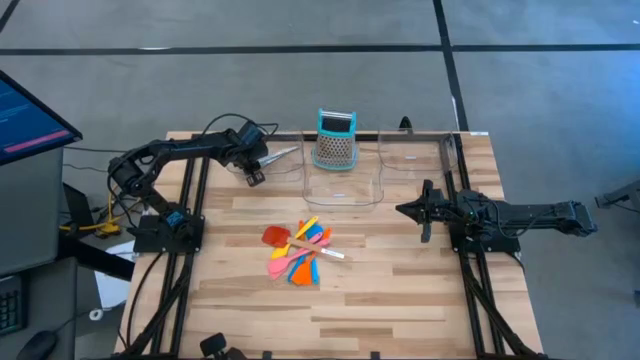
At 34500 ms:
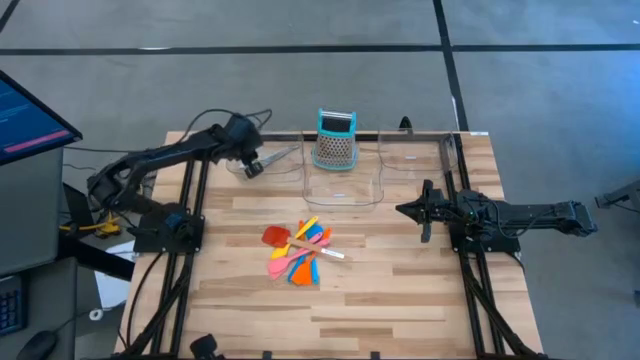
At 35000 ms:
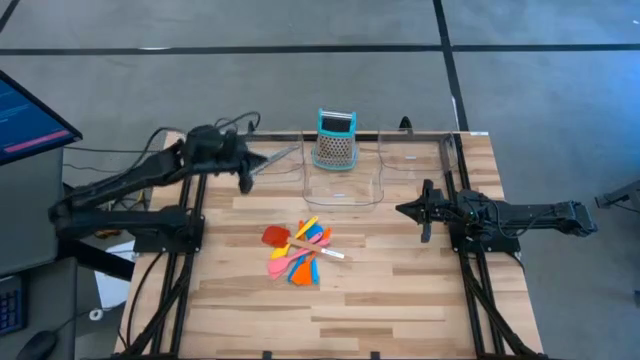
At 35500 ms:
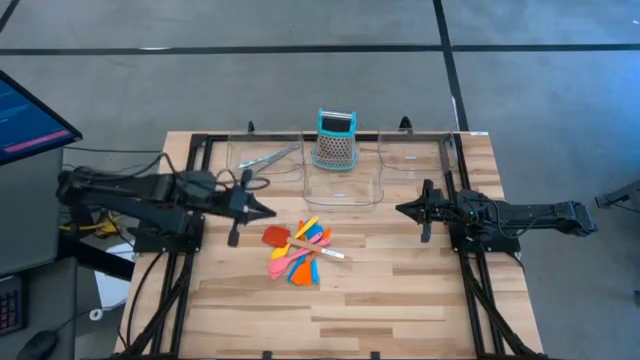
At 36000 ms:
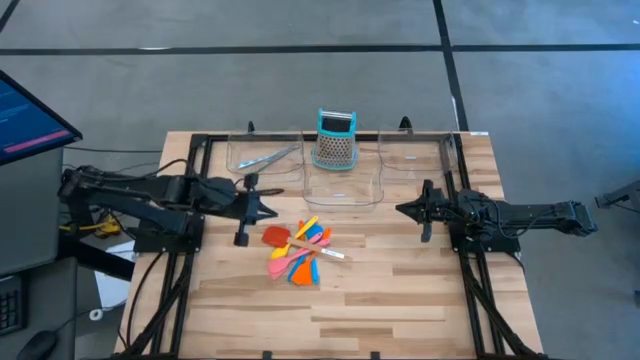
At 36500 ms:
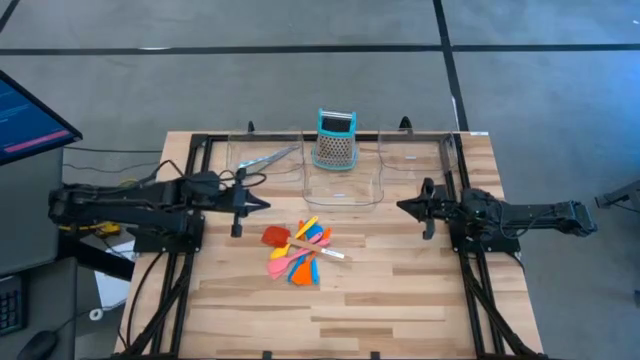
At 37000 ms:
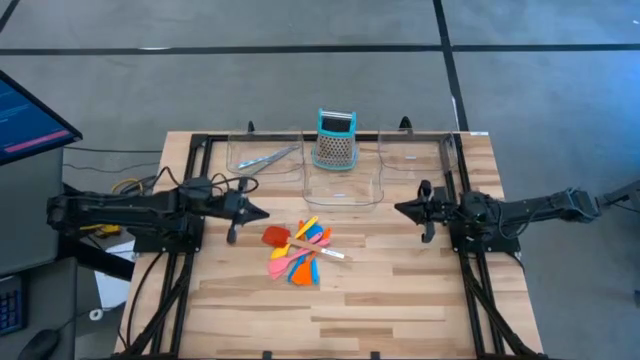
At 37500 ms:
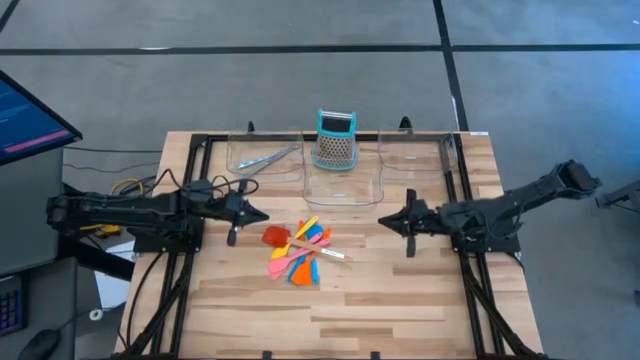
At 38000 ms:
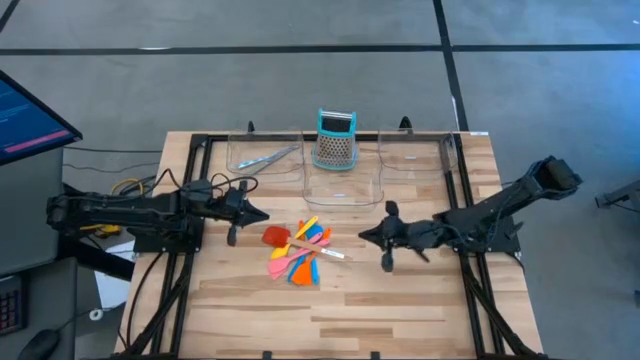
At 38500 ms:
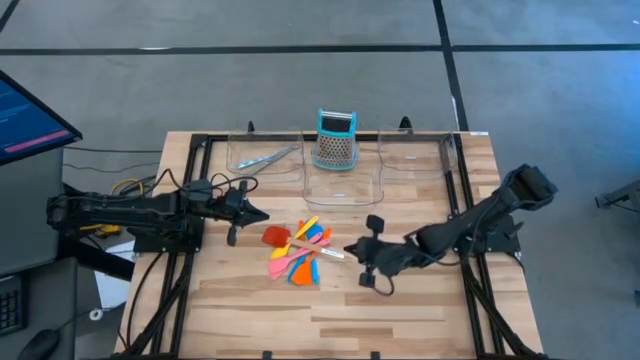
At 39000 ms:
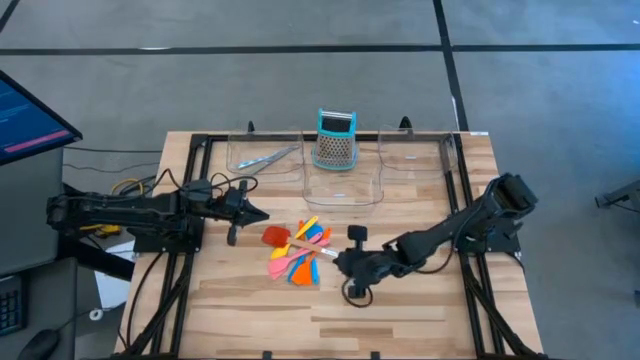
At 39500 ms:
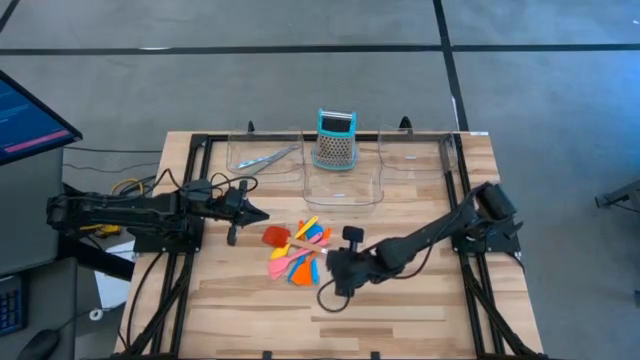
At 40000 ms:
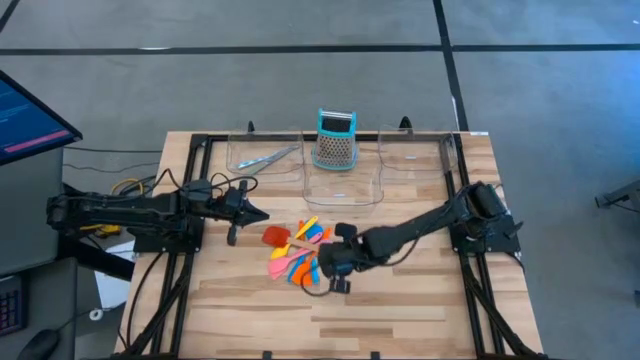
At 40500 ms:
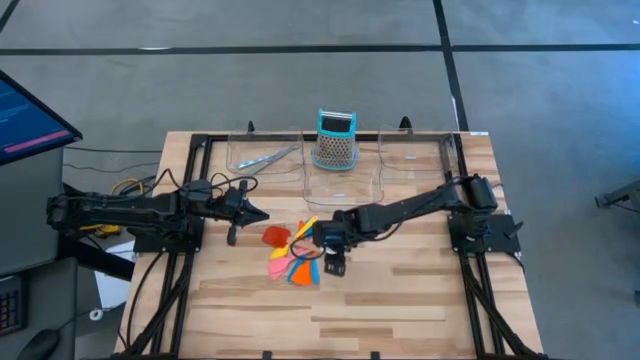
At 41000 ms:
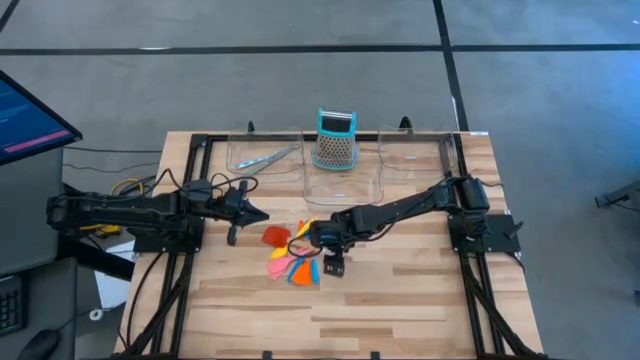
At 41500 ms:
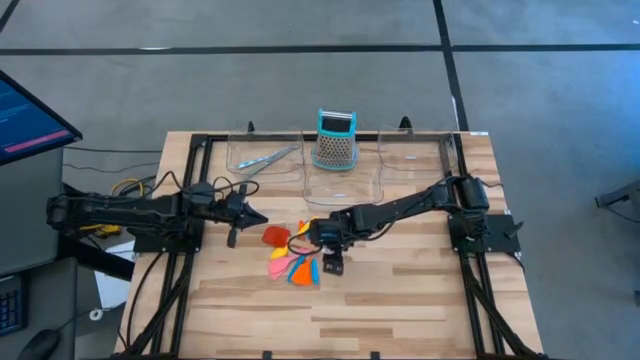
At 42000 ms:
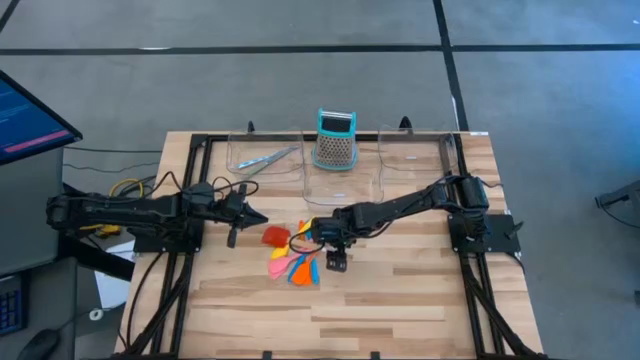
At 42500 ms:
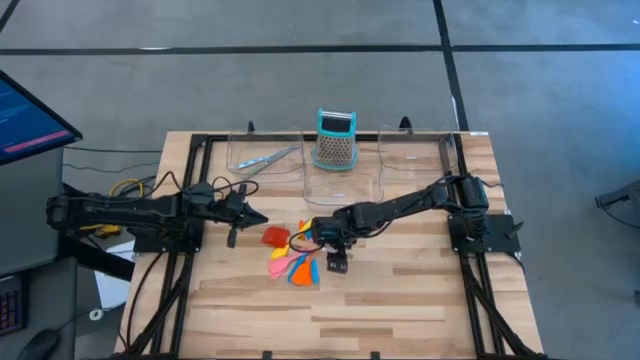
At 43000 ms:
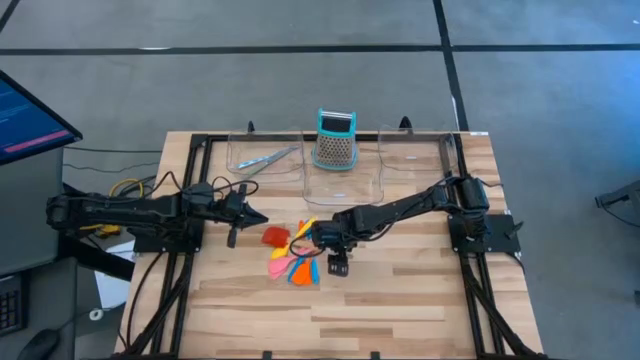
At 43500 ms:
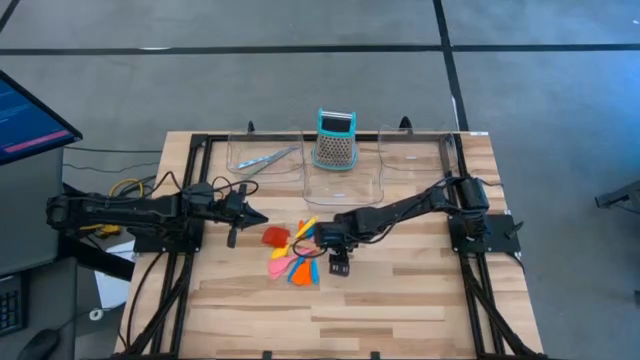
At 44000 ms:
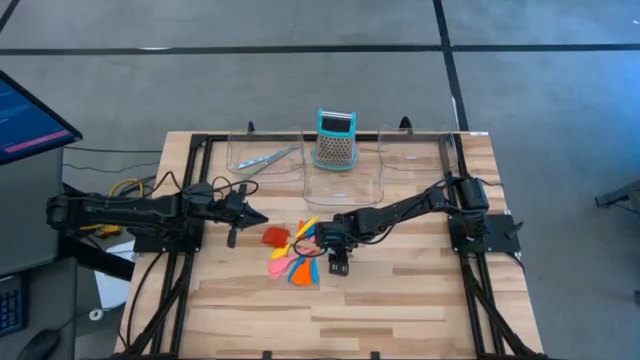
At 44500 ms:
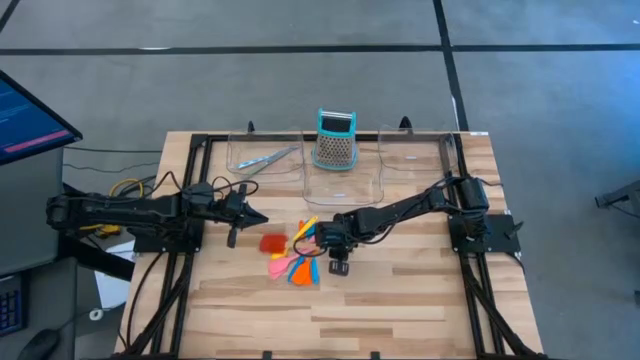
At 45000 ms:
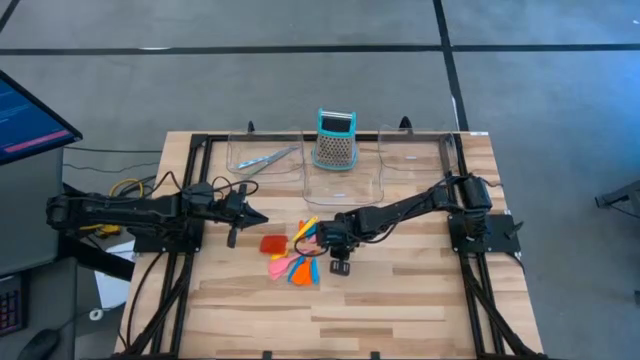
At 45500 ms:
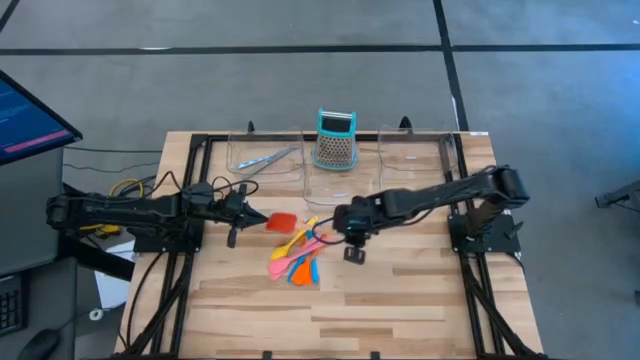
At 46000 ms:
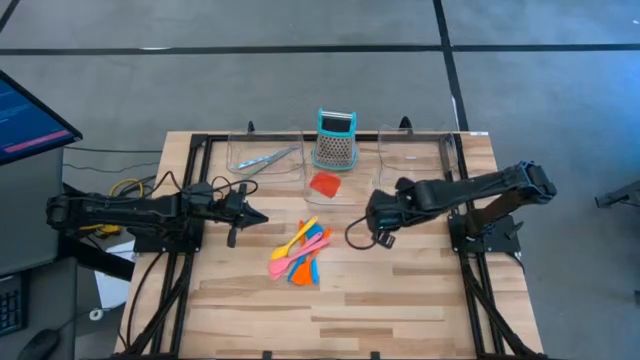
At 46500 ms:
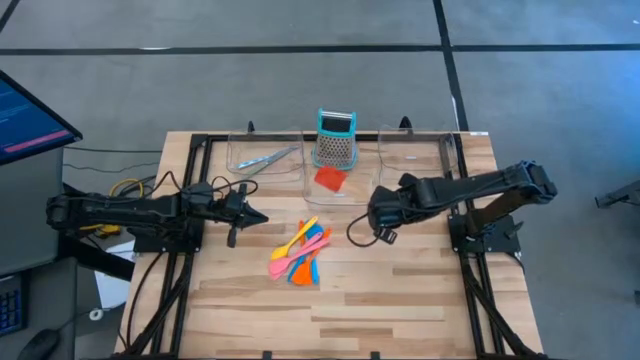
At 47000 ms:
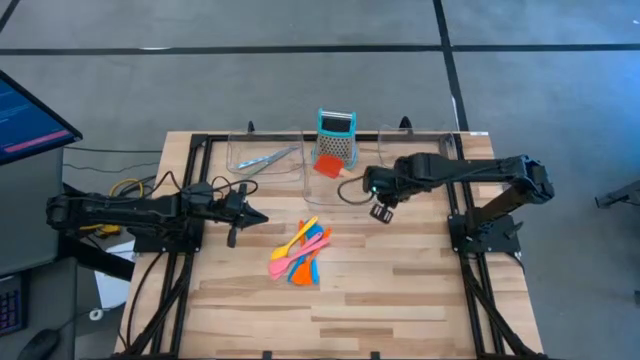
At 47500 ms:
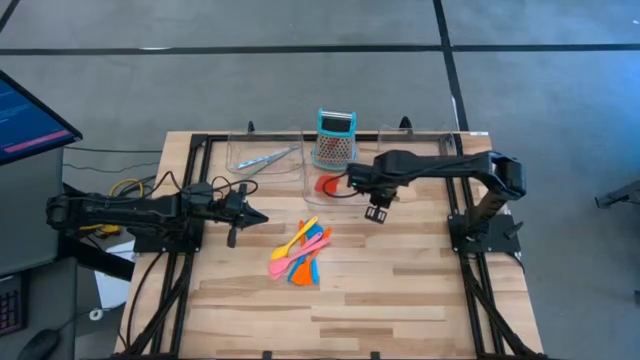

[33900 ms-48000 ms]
Task: Pick & Place Kitchen Items
Put the red spatula into the middle transparent bin

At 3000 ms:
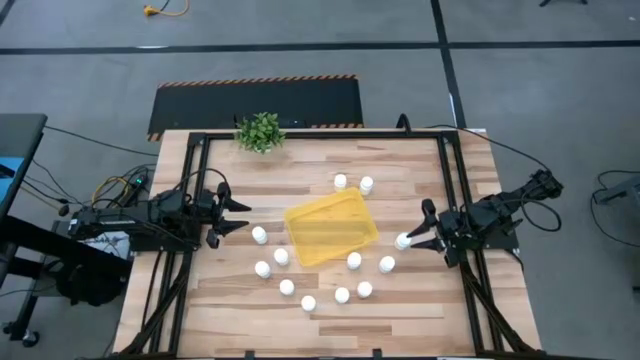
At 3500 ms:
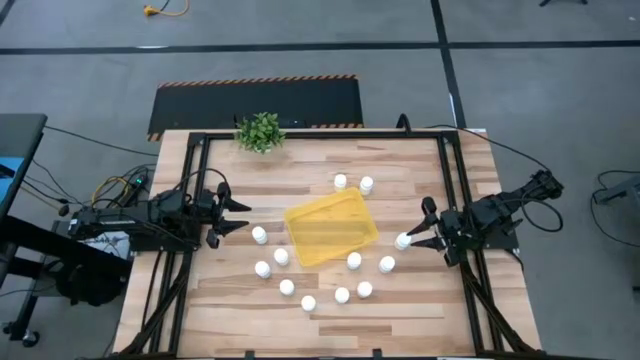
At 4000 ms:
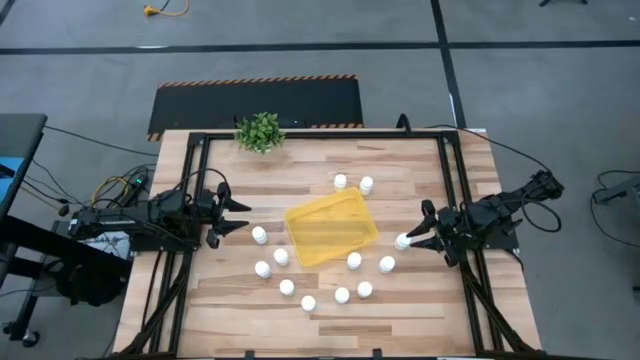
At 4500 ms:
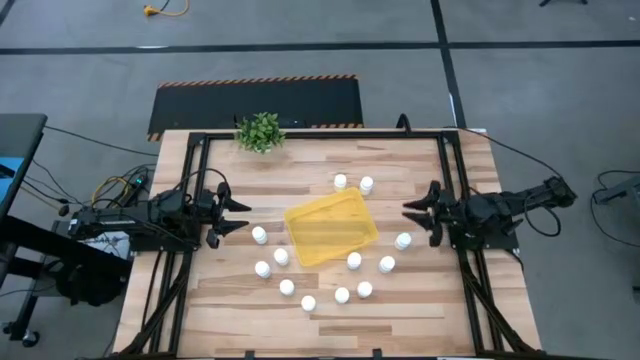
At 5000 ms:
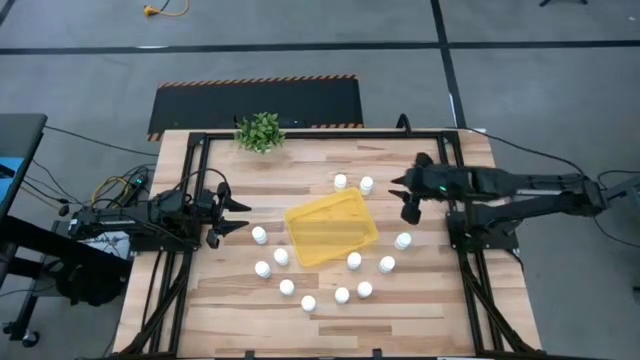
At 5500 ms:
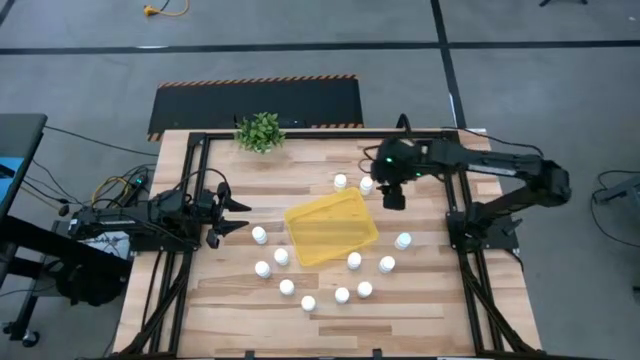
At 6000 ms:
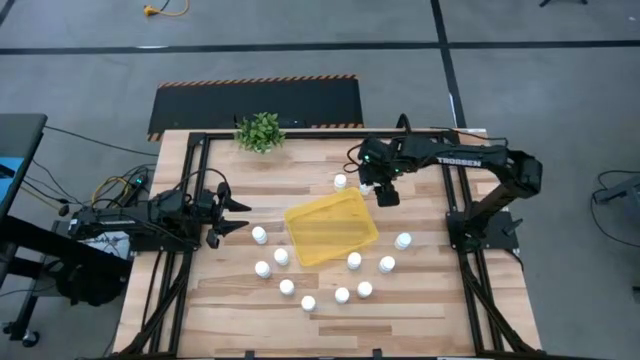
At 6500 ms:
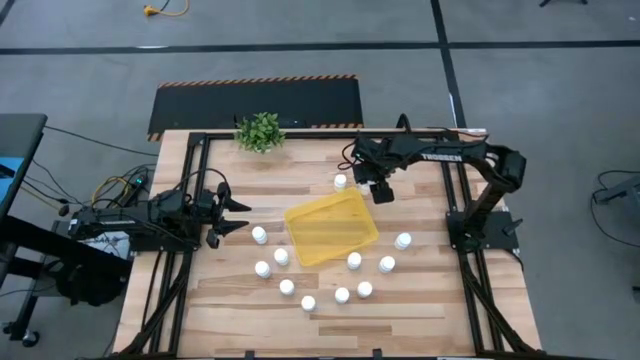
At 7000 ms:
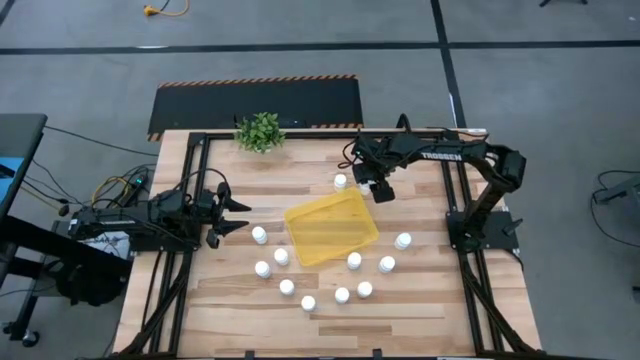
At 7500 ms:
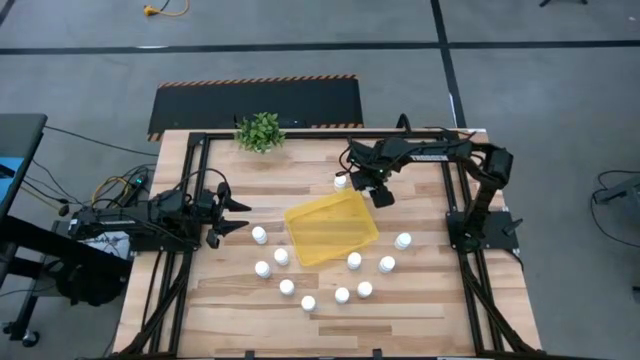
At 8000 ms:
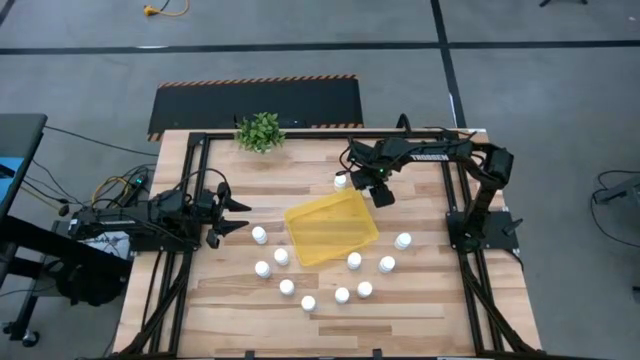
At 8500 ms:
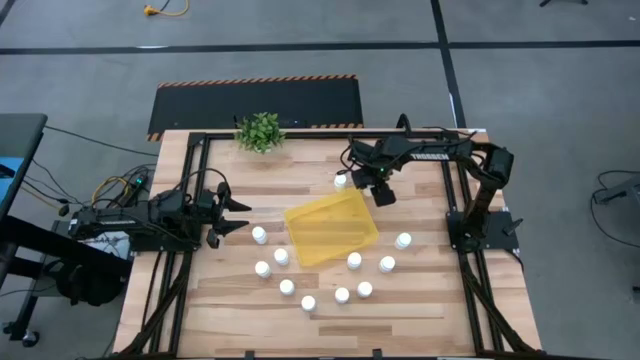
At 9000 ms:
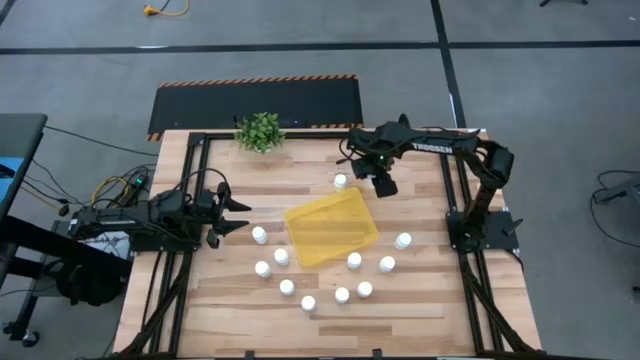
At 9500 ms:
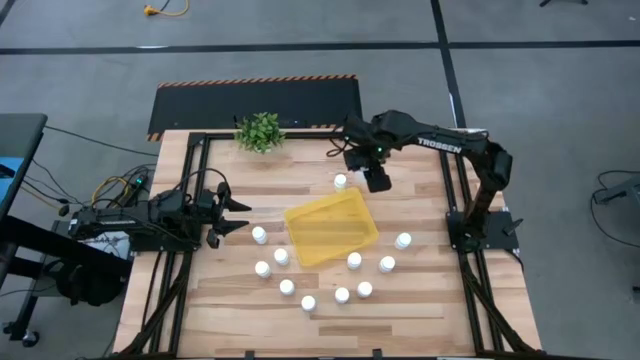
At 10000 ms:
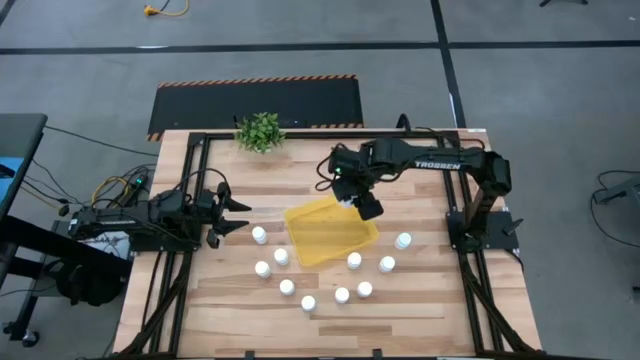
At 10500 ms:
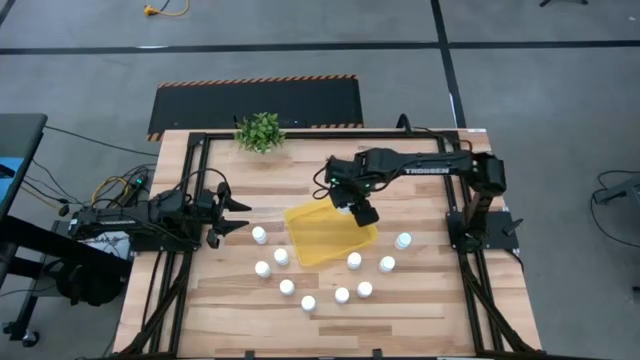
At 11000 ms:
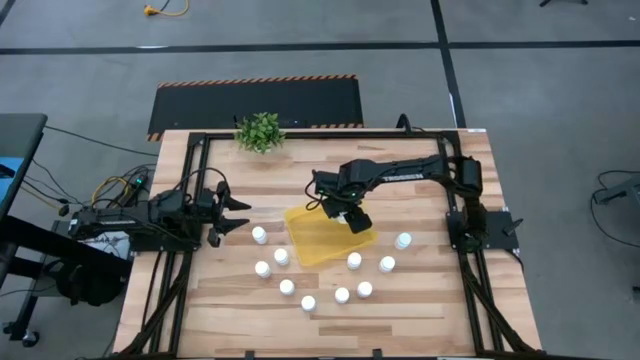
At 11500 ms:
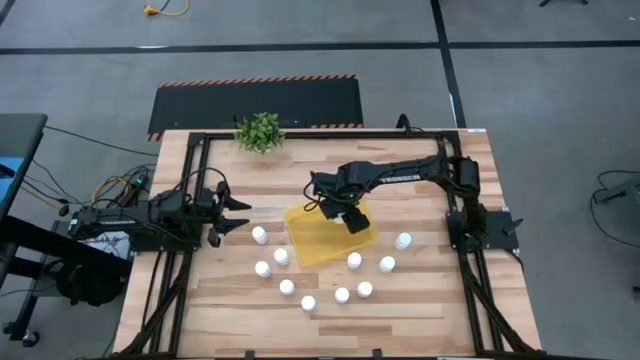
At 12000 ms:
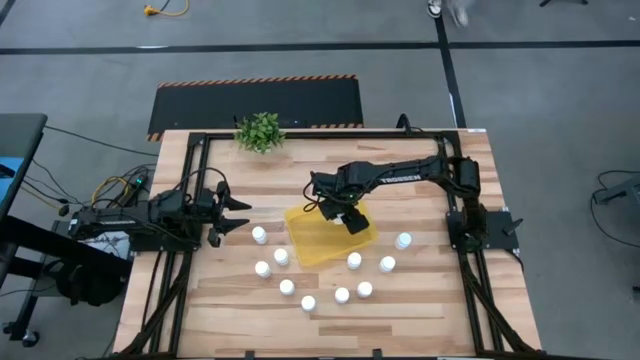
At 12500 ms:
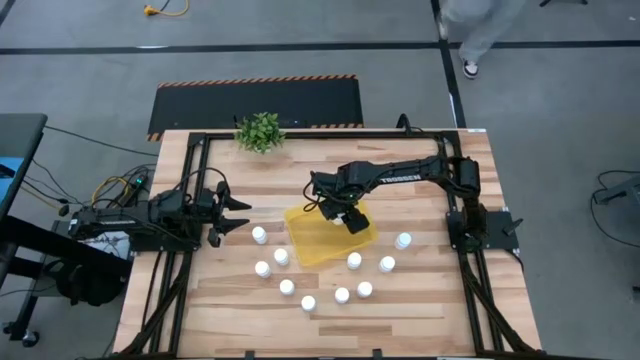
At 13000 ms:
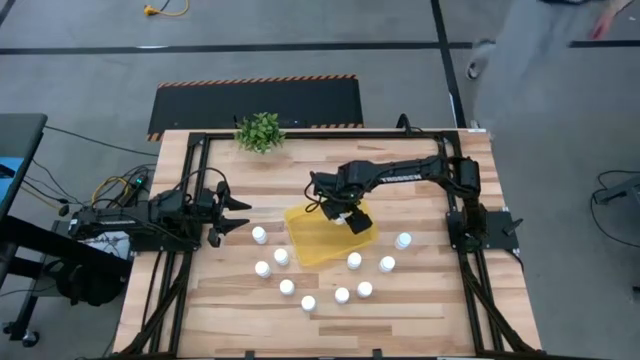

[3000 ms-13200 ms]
Task: Pick and place pill bottles into a basket
Put the white pill bottle into the yellow bin
